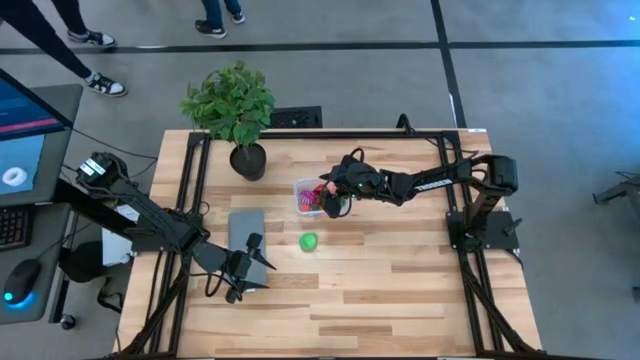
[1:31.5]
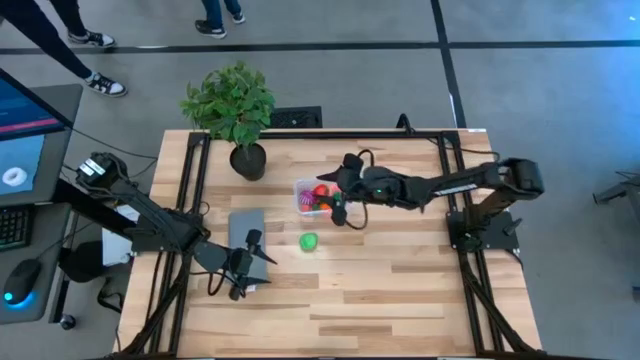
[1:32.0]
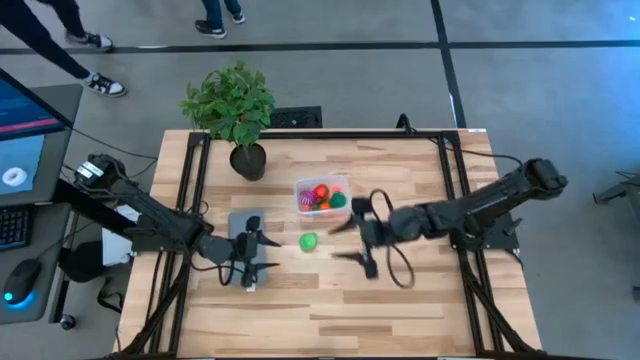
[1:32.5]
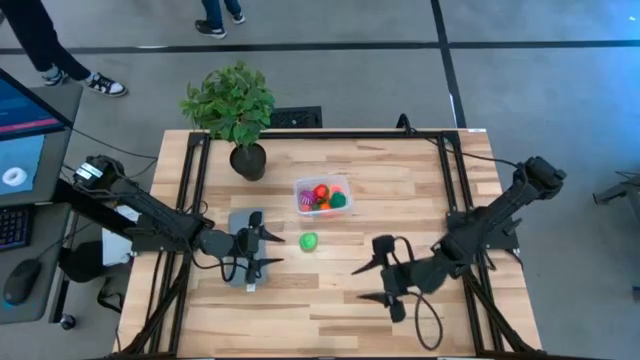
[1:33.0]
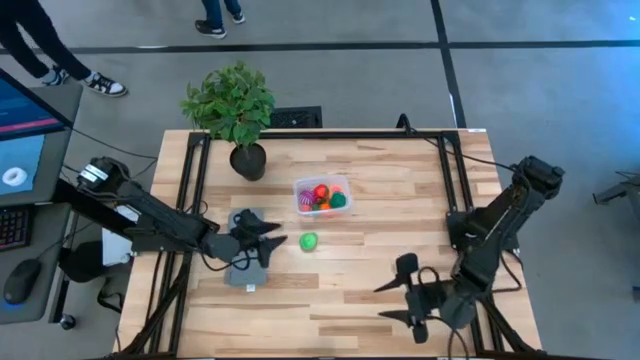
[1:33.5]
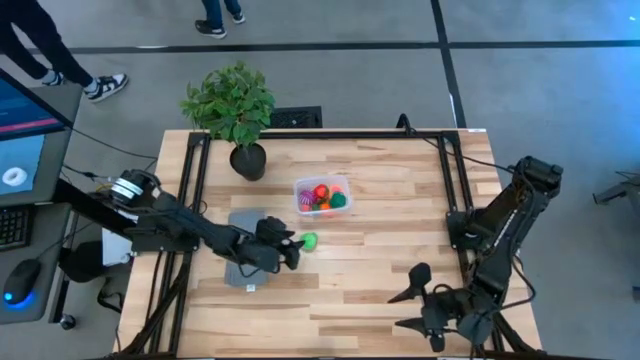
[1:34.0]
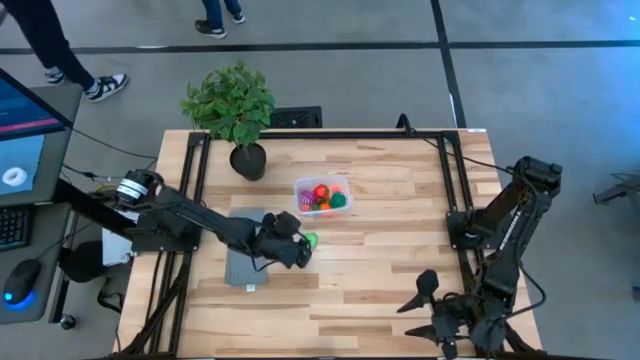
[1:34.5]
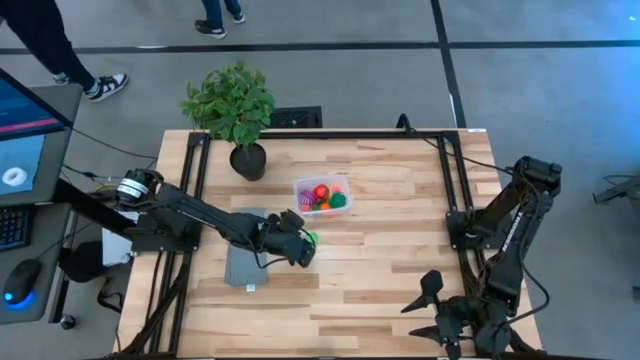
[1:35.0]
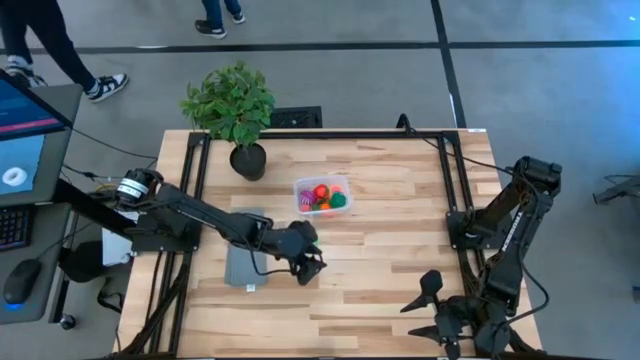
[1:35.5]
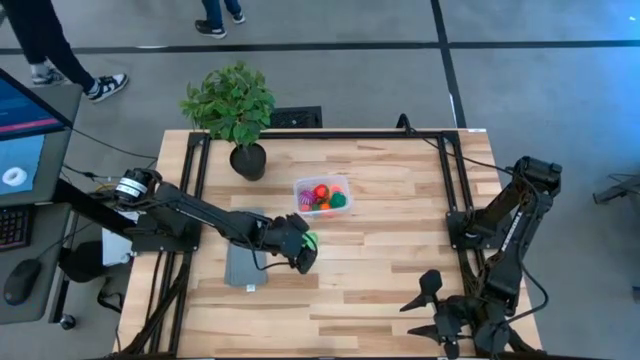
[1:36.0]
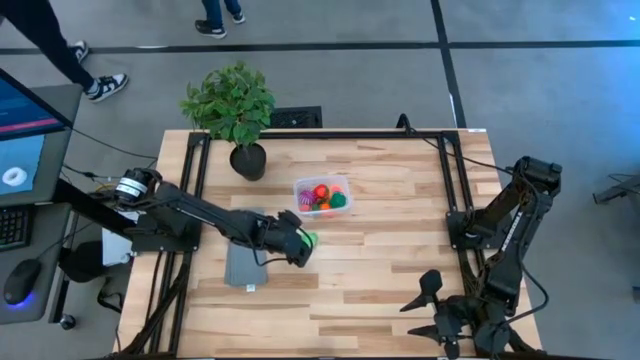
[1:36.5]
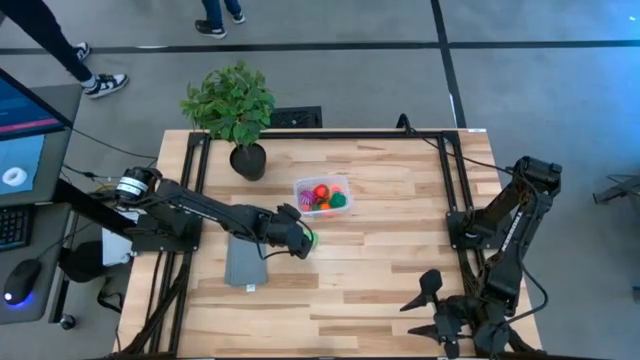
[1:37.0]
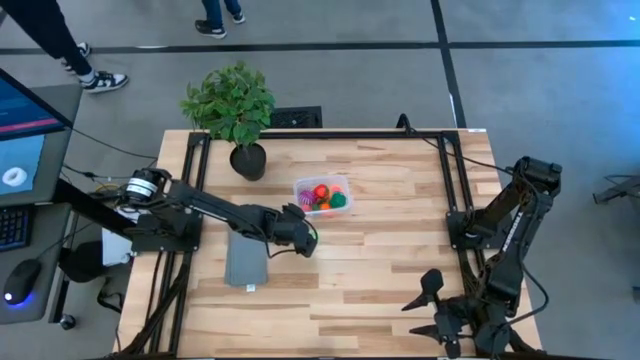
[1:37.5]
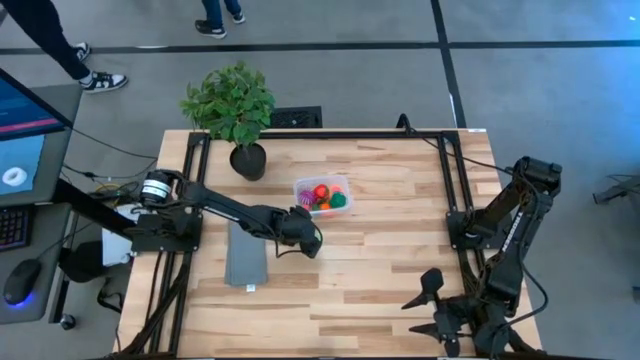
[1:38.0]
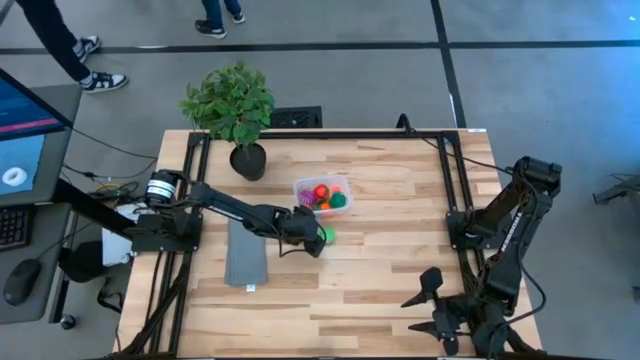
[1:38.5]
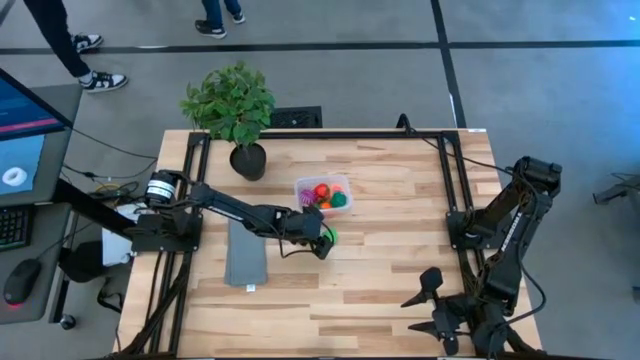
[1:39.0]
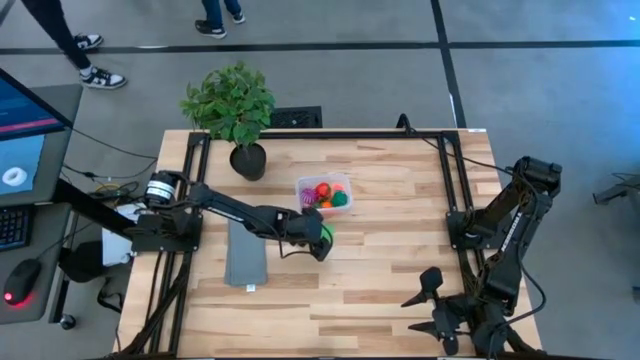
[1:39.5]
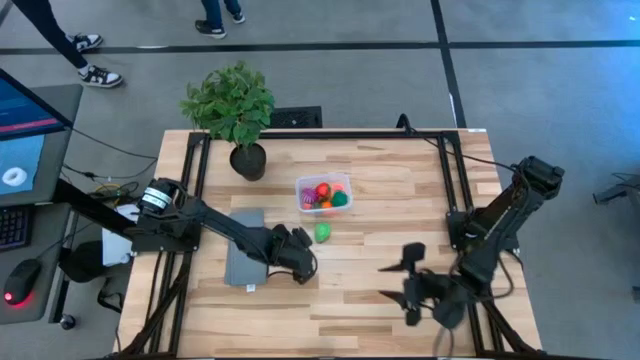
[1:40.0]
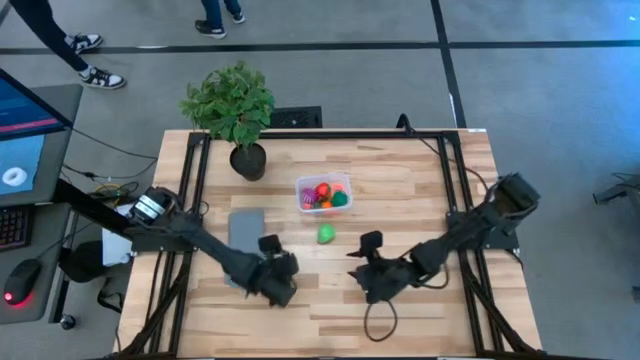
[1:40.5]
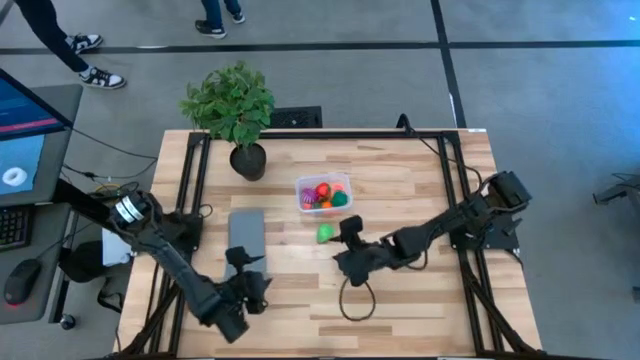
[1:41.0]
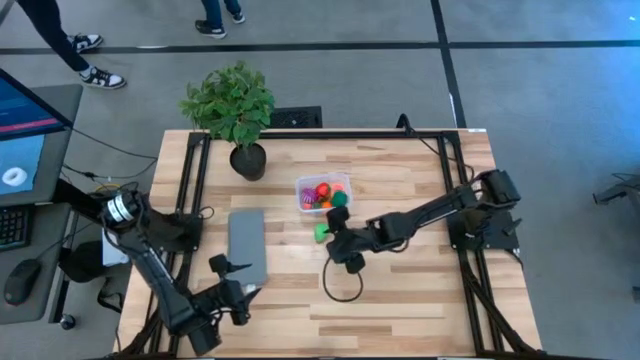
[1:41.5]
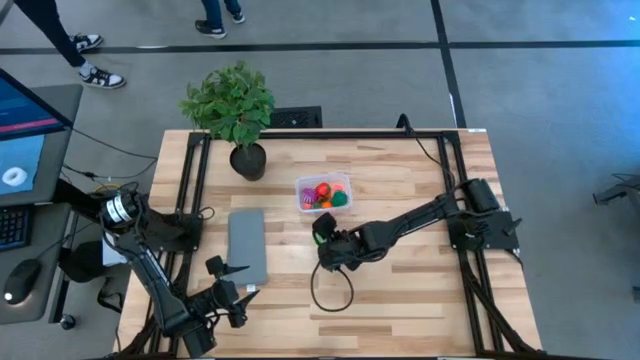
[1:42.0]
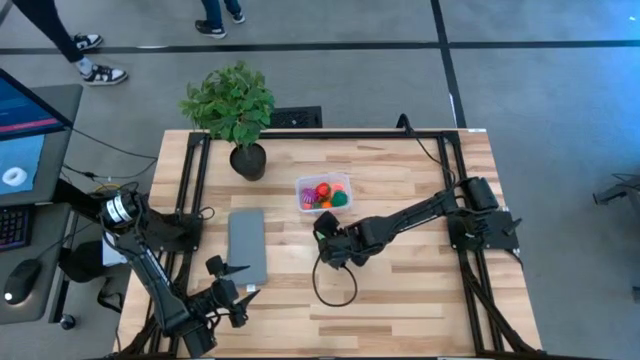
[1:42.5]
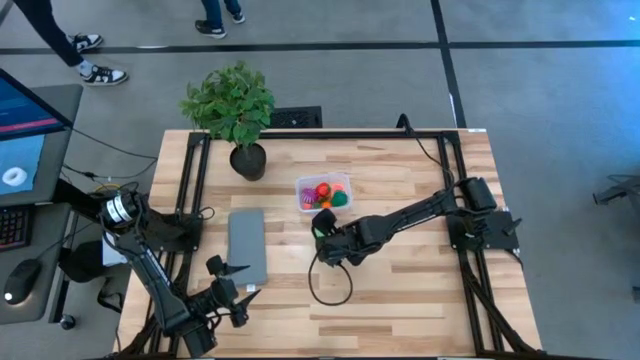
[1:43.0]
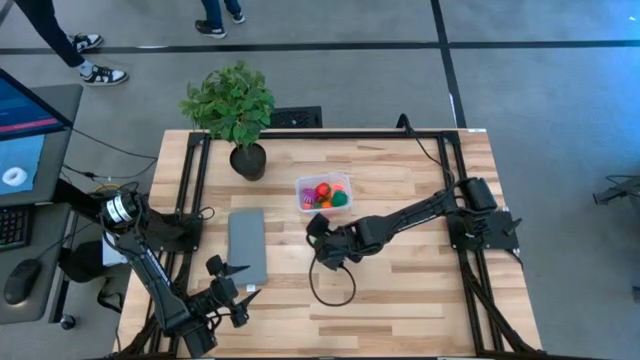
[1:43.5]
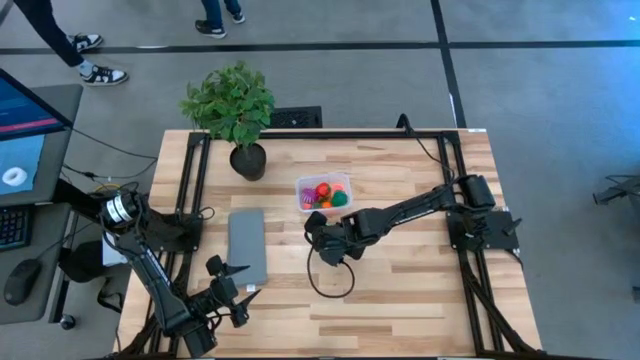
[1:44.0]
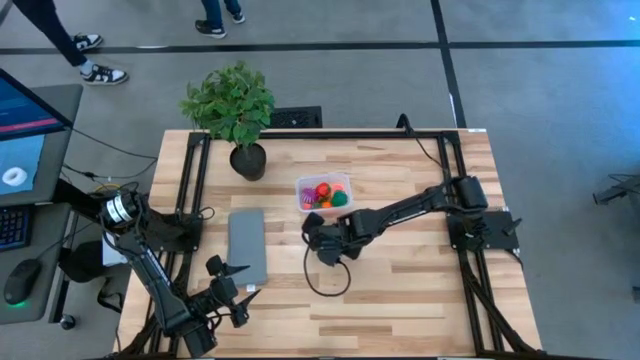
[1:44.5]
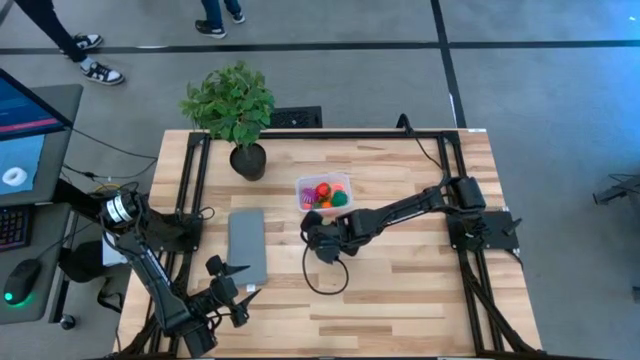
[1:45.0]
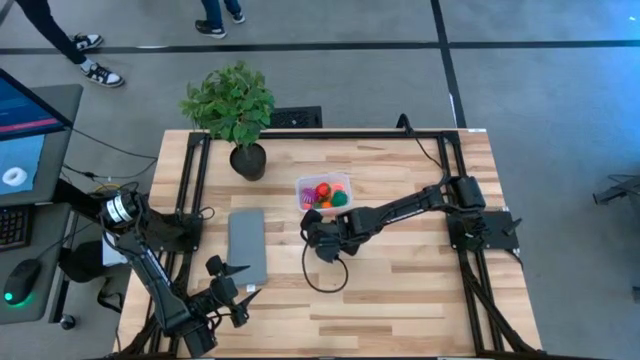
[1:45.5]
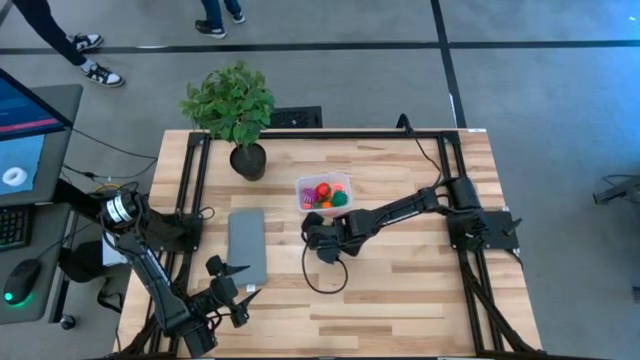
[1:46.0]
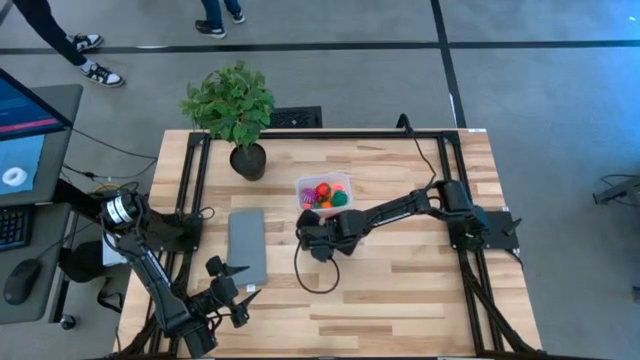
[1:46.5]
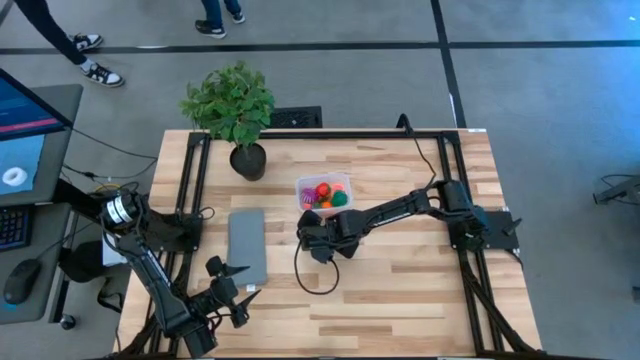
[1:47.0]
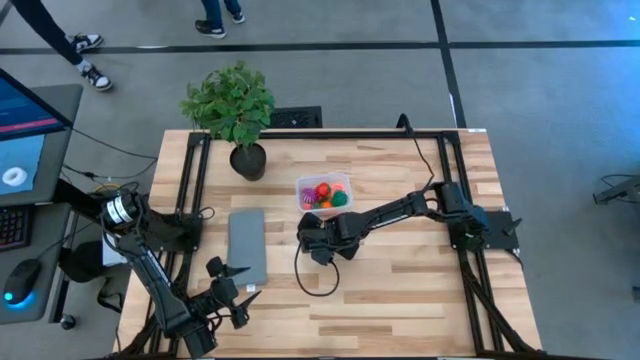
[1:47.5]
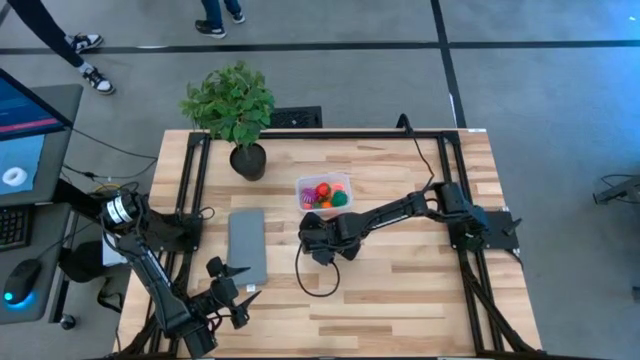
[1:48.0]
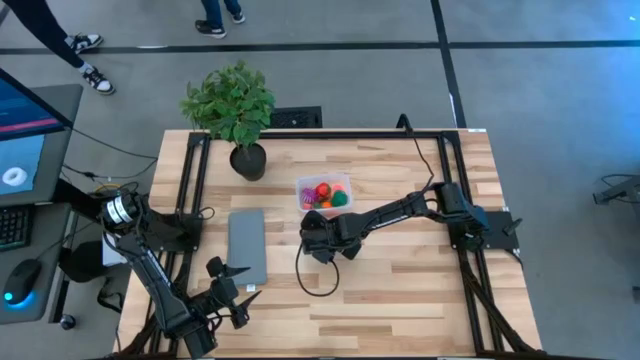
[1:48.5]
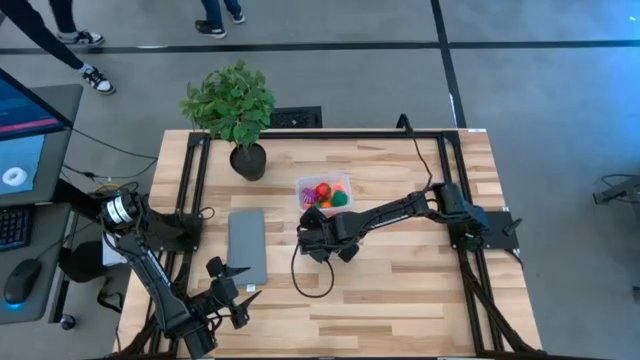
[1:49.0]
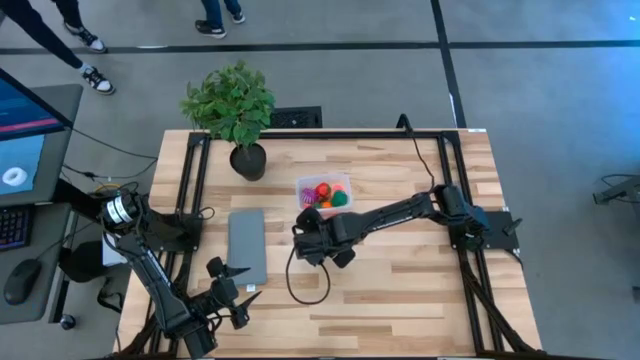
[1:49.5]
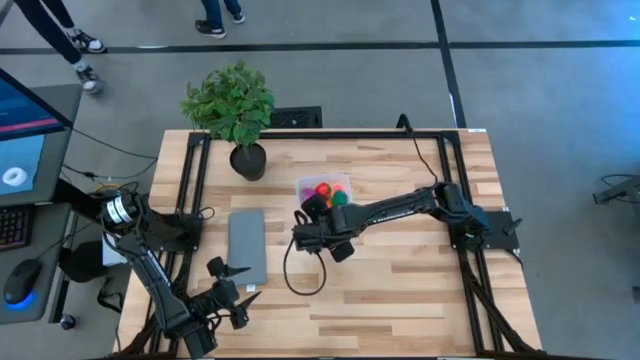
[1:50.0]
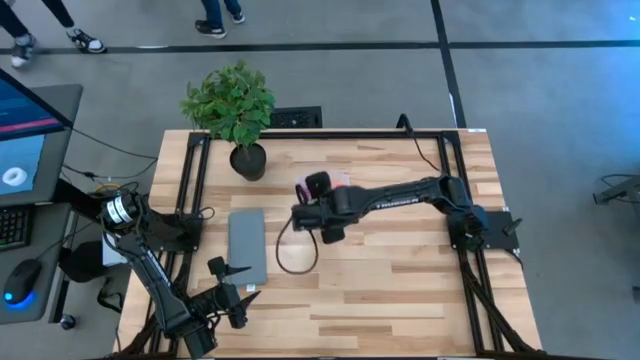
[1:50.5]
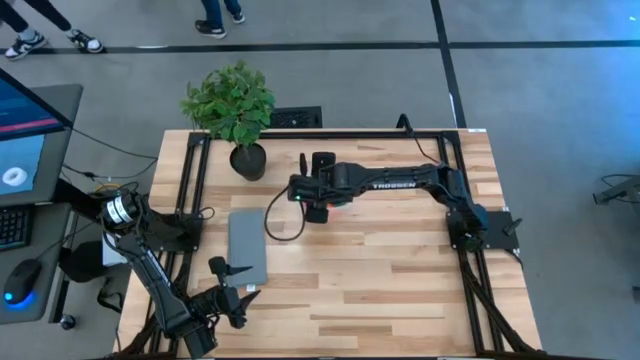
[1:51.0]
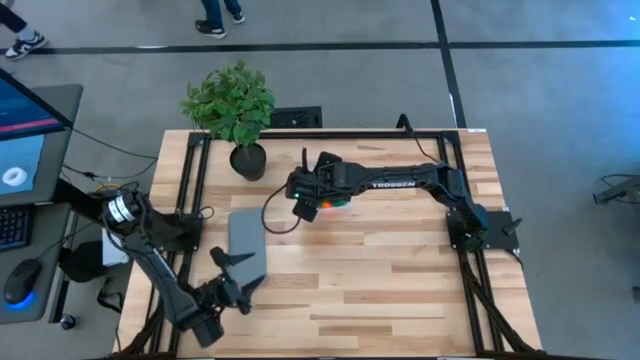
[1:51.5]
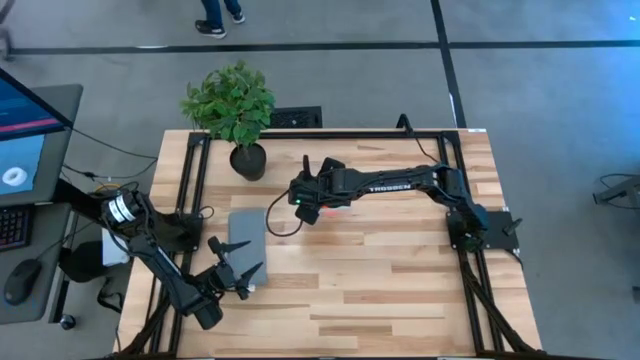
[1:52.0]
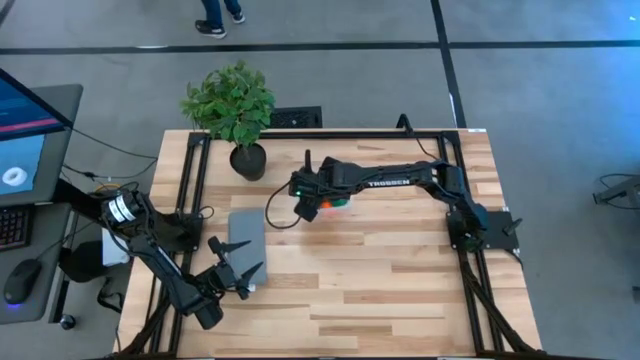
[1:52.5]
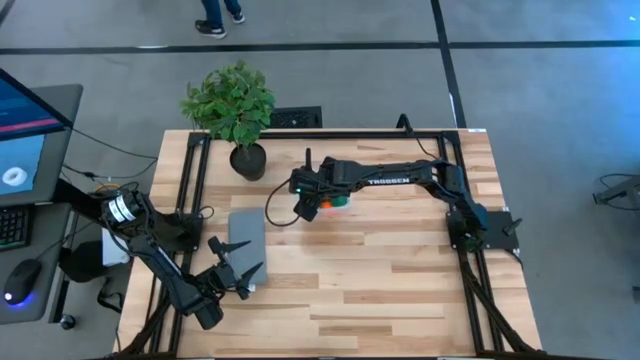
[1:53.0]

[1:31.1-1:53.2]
Task: Pick and placing Produce into tupperware
Put the avocado into the transparent container
